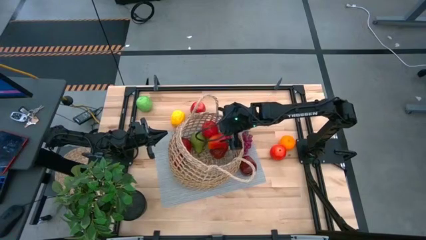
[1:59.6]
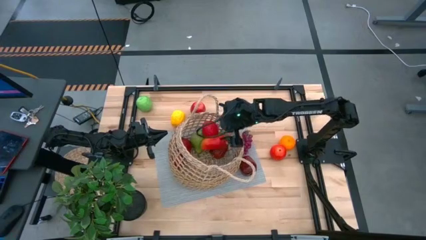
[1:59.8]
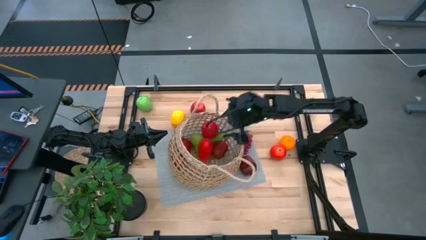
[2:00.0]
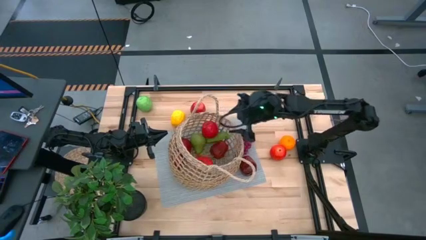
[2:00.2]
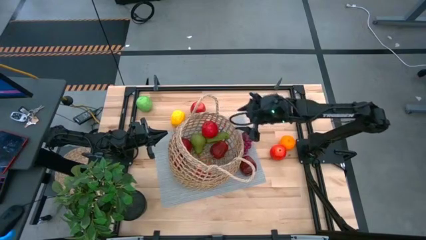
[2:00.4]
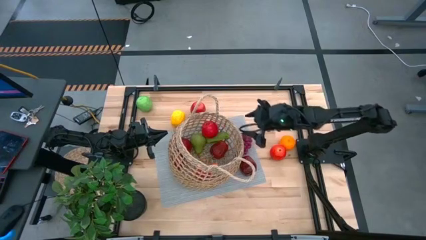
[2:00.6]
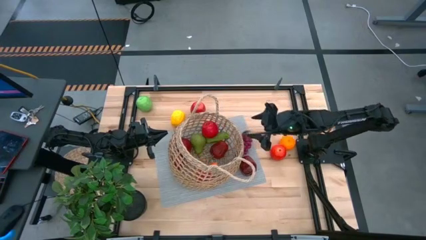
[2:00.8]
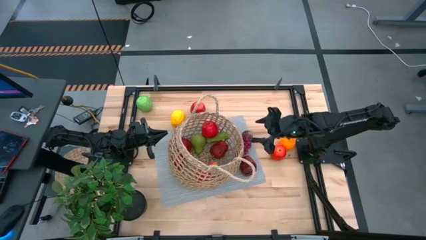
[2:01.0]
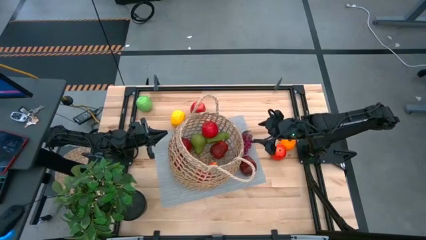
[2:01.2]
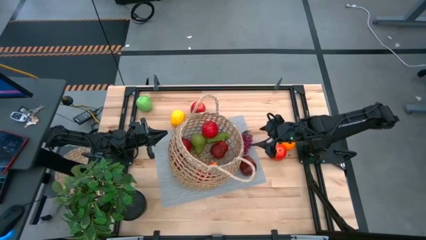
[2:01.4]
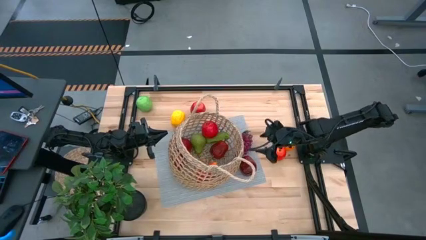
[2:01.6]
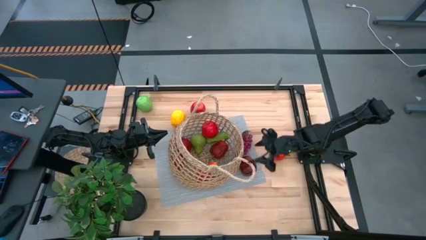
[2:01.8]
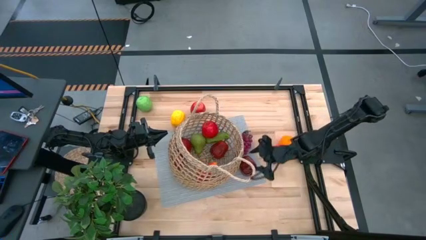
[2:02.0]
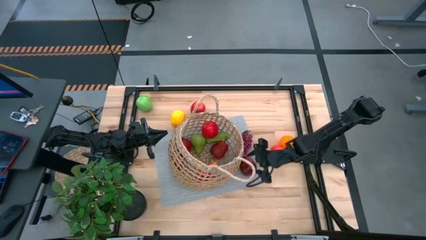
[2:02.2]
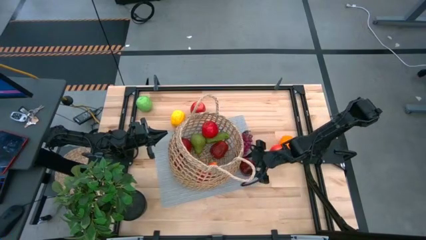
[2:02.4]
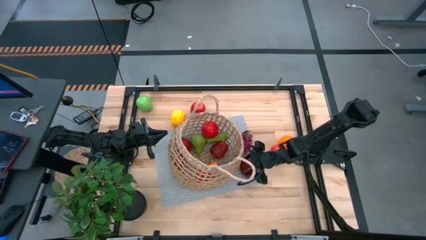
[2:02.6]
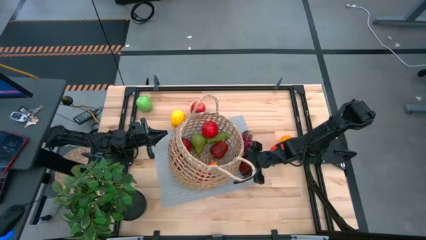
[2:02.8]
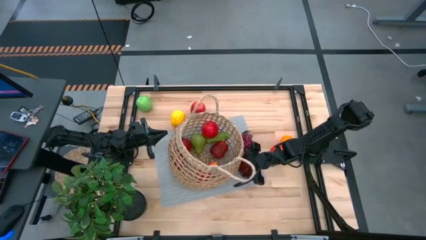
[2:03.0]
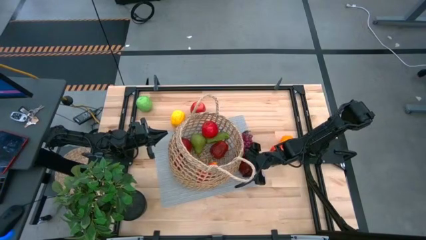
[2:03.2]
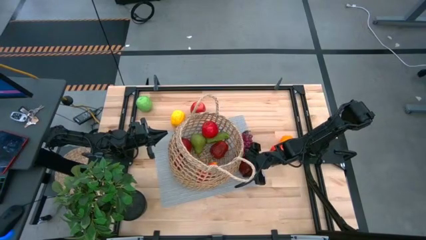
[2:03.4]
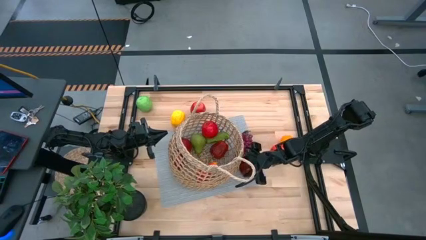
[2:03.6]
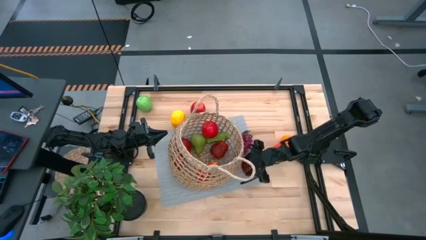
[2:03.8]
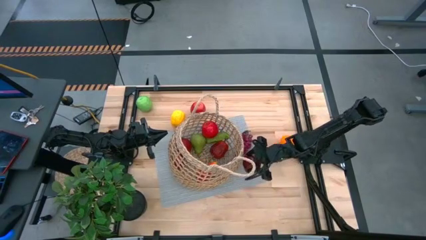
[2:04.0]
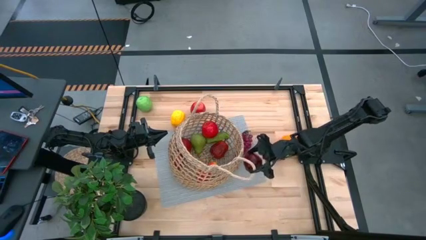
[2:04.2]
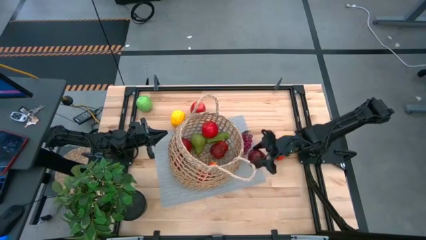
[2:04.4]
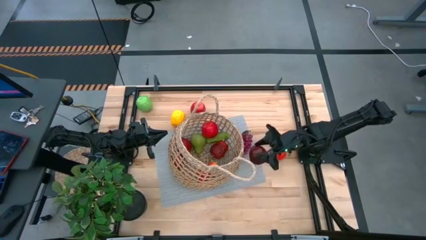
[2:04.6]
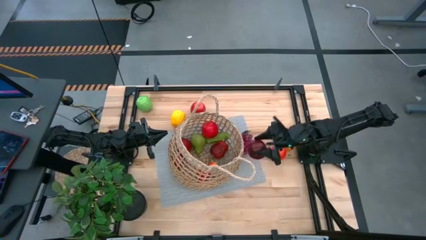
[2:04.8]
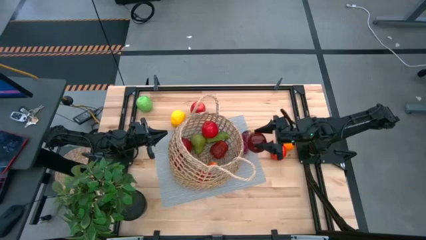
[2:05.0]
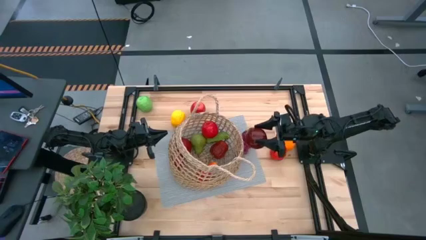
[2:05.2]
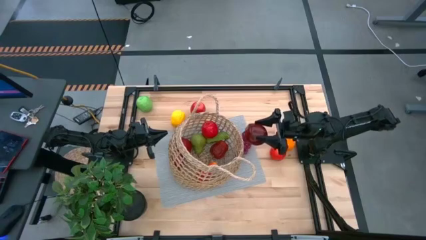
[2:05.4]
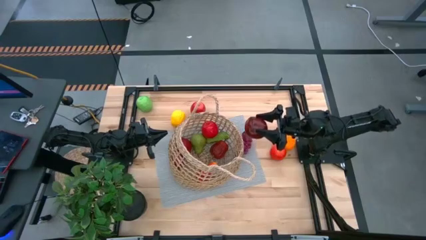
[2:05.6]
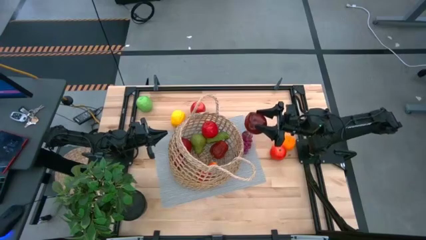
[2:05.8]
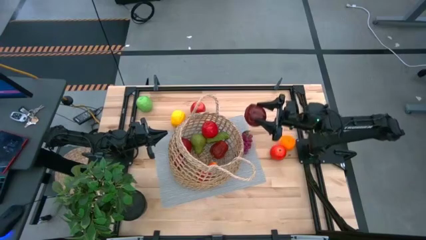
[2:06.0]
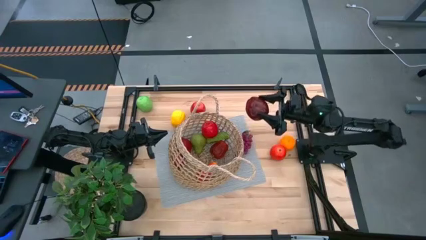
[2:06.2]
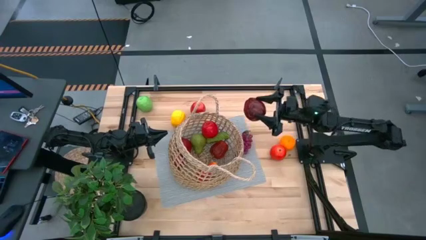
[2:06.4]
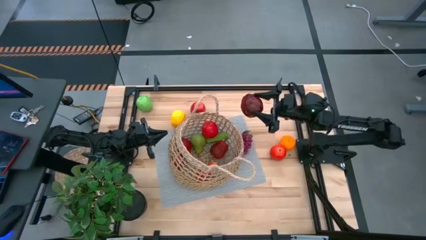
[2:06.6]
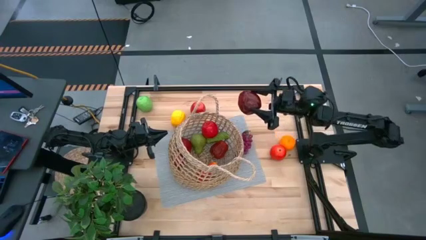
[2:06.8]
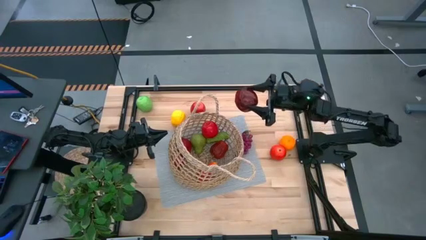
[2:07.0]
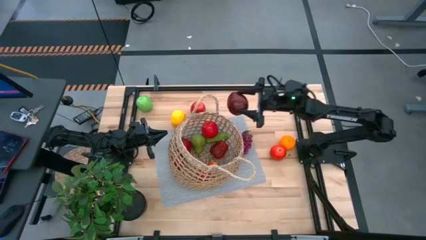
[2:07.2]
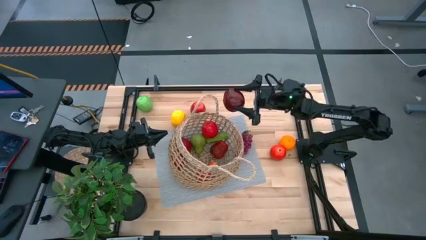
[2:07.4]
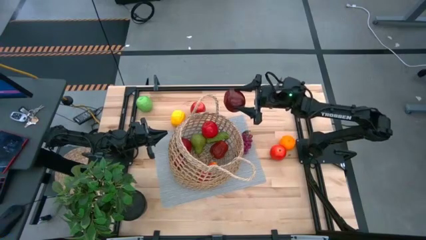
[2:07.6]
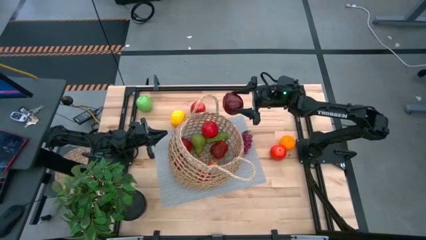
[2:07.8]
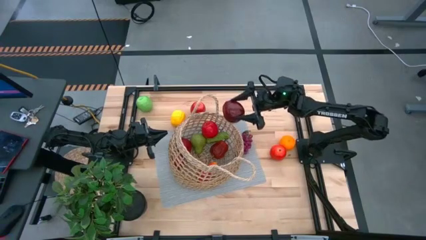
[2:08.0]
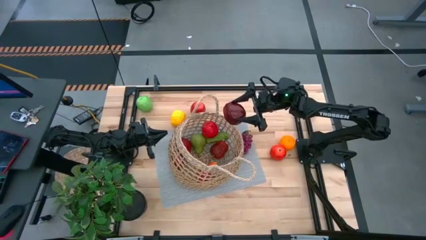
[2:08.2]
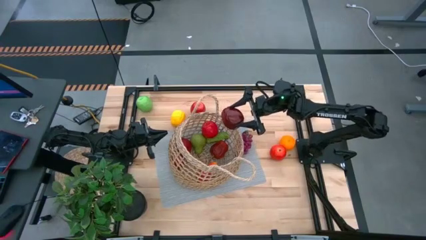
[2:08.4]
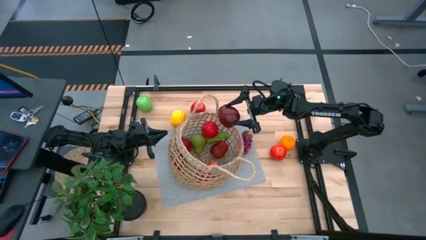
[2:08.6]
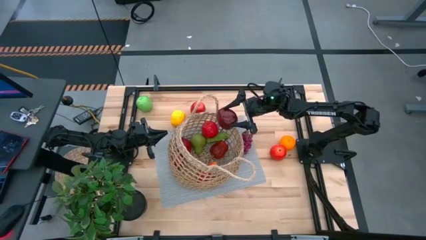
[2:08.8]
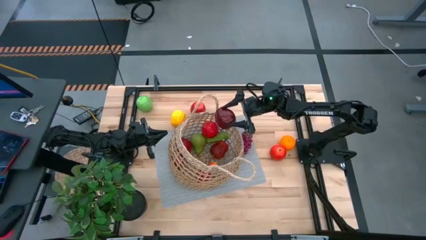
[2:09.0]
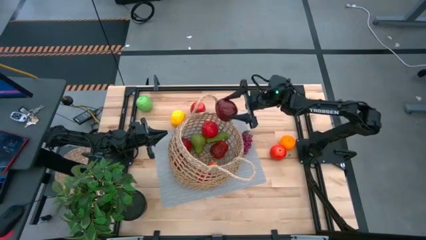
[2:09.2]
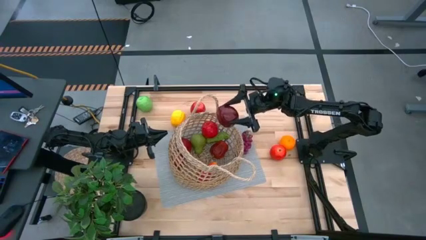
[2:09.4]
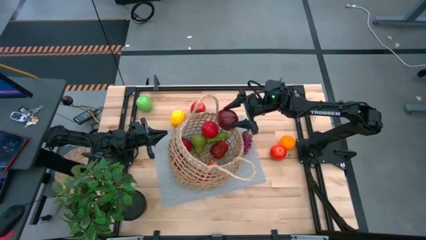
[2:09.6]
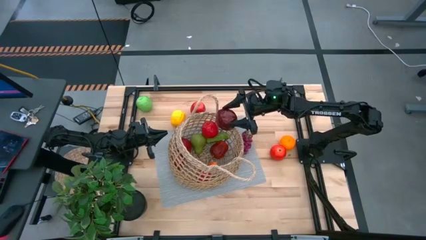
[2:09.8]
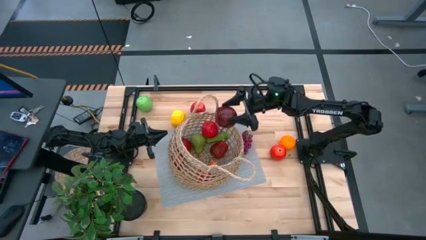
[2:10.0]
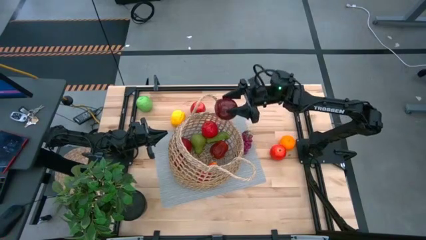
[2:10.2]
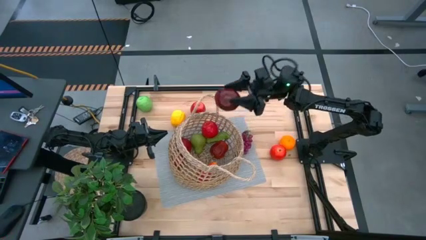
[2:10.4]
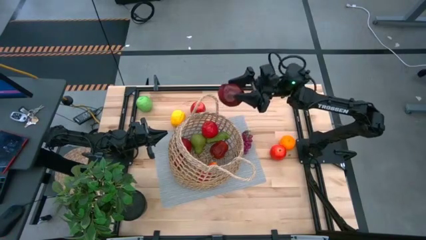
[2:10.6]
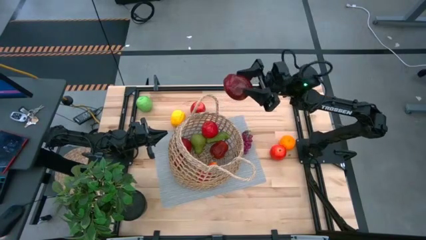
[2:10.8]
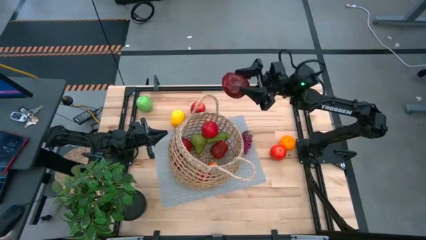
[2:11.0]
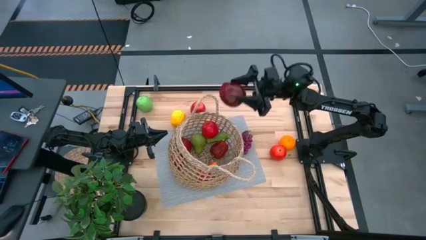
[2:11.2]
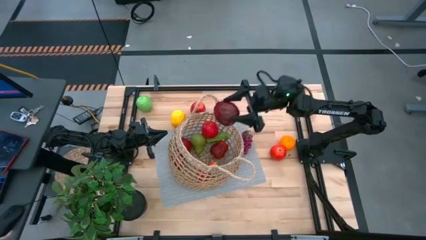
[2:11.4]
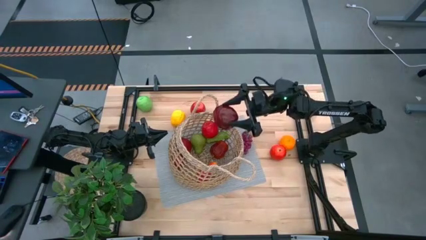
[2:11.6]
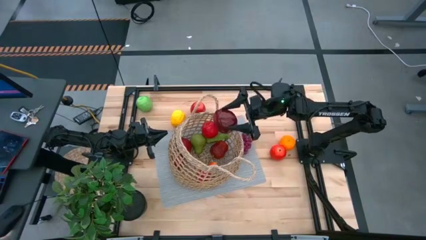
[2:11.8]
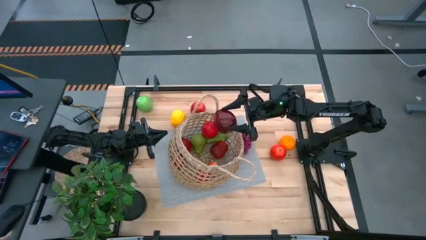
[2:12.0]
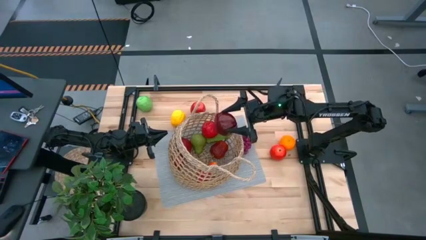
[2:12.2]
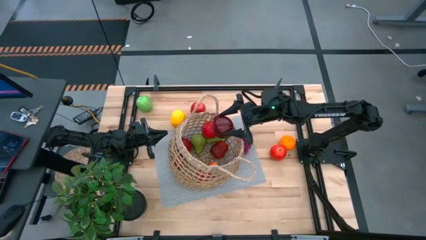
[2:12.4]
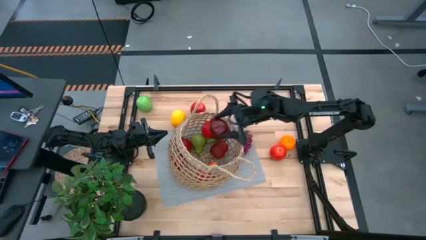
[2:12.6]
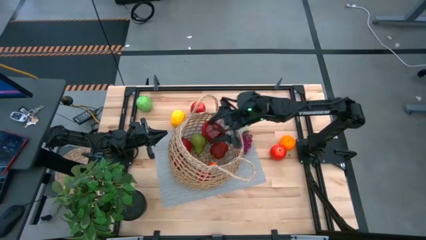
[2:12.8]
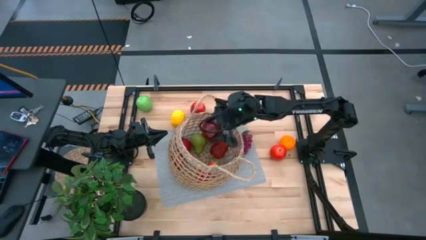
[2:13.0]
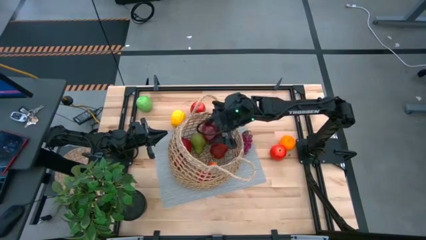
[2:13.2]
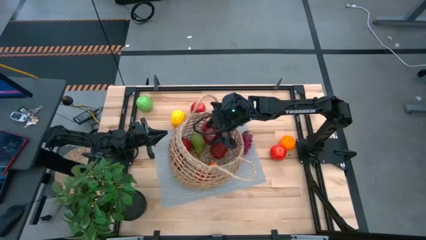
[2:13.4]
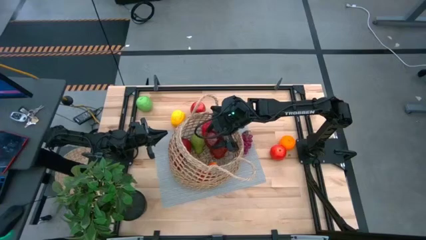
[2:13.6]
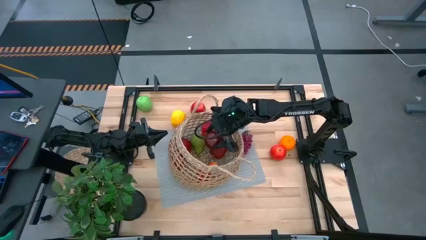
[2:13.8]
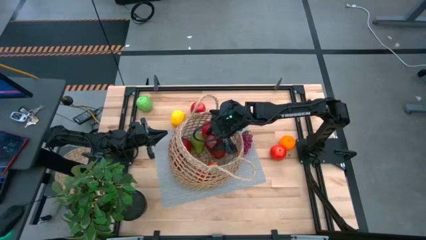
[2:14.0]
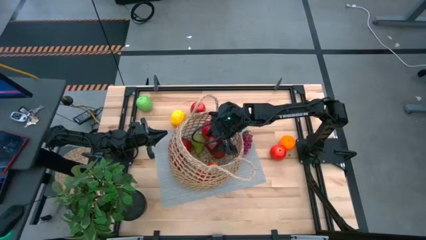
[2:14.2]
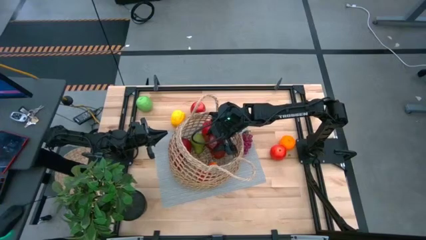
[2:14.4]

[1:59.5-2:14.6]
Task: Build produce basket
Put the red apple into the basket

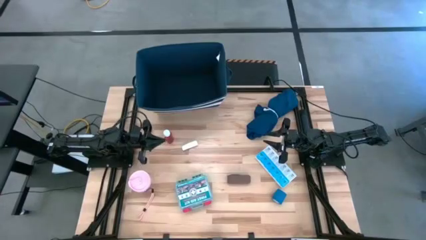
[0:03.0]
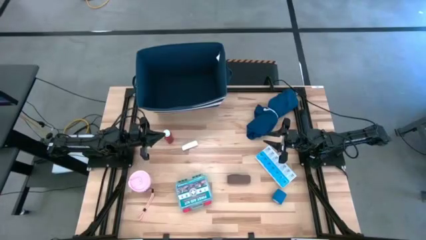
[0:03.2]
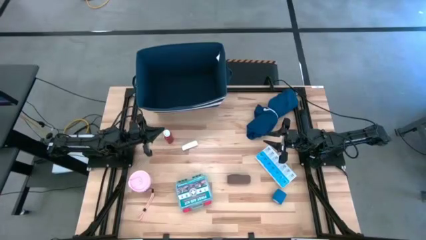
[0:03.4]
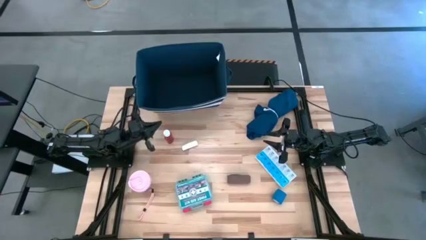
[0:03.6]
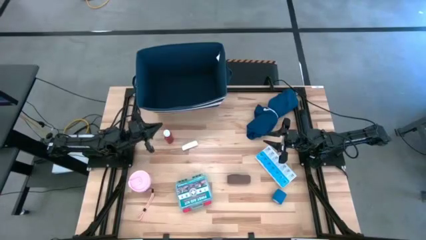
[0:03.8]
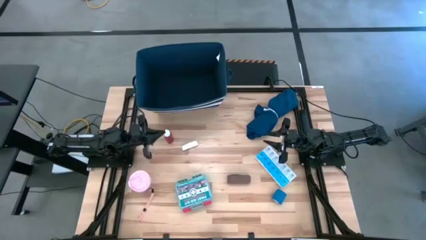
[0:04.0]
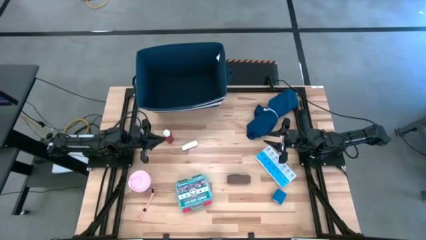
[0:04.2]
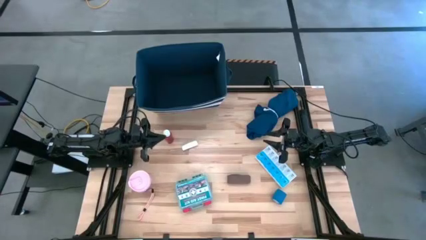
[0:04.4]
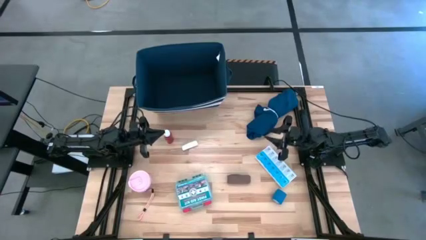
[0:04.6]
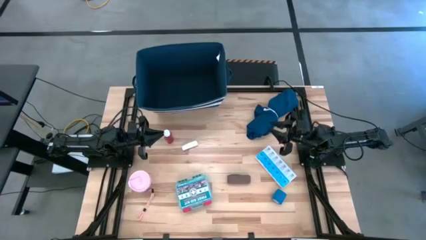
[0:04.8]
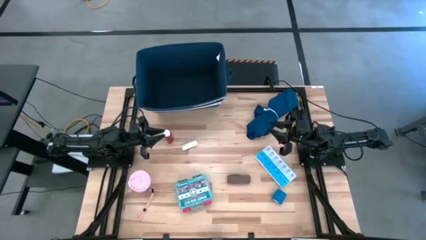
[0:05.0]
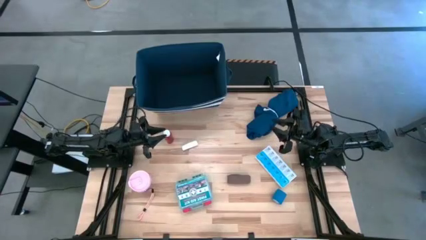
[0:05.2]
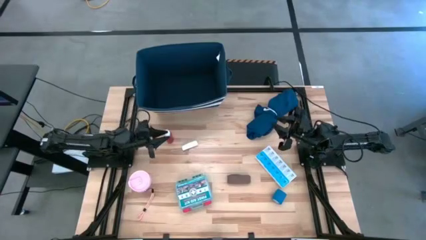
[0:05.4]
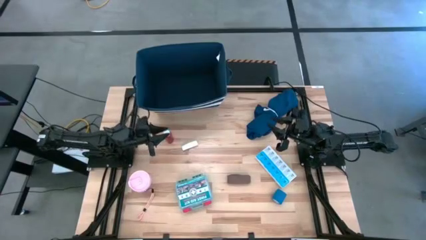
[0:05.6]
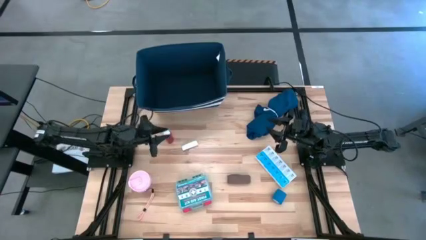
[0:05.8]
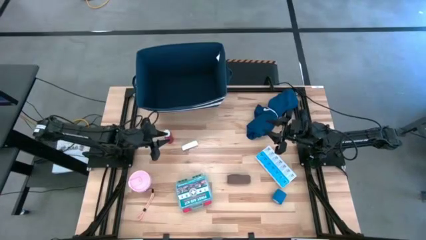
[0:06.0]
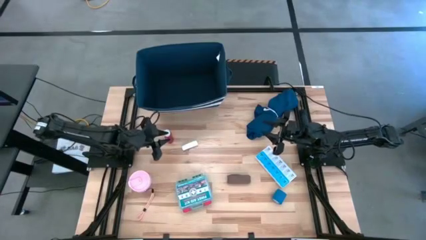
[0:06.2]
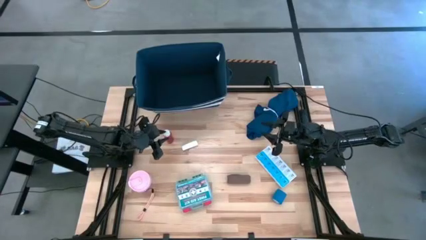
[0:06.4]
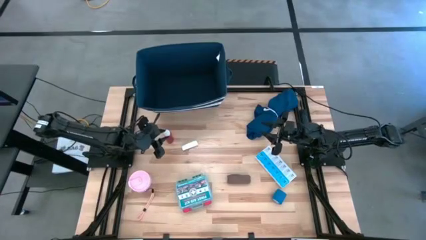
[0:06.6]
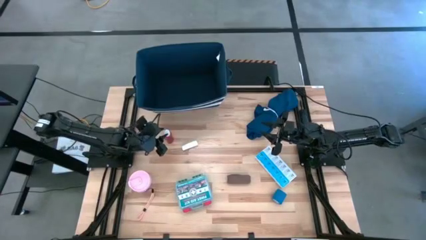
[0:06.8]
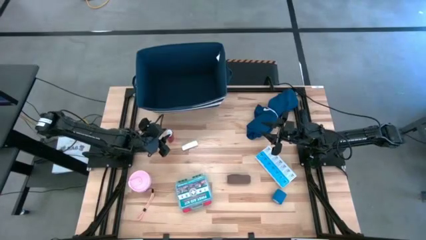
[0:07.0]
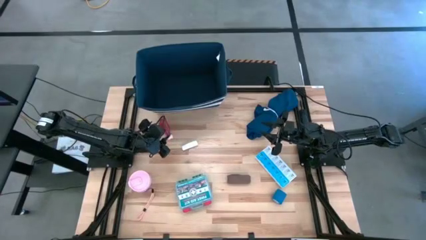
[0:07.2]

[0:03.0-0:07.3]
Task: Pick & place medical supplies in basket/bin
Put the red pill bottle into blue bin
